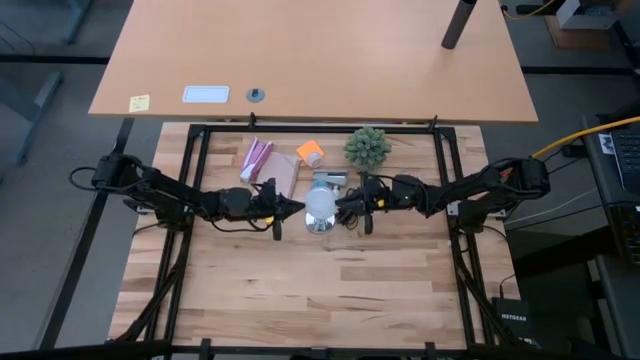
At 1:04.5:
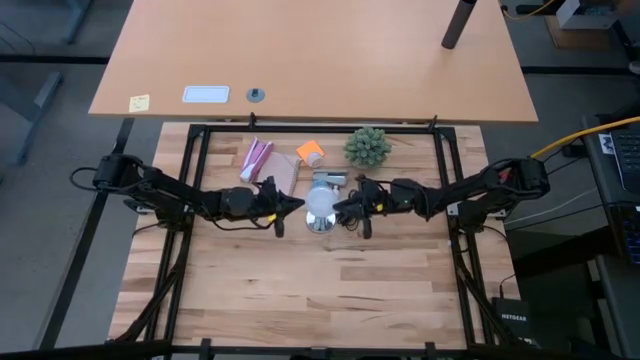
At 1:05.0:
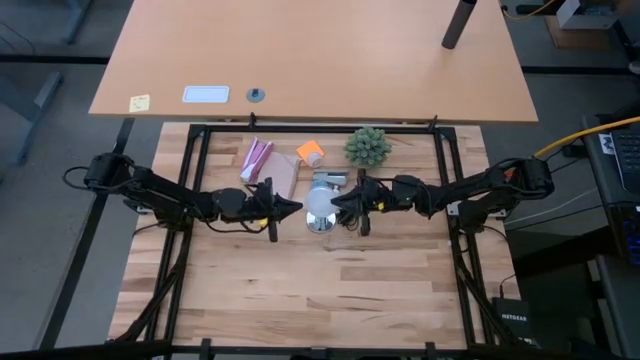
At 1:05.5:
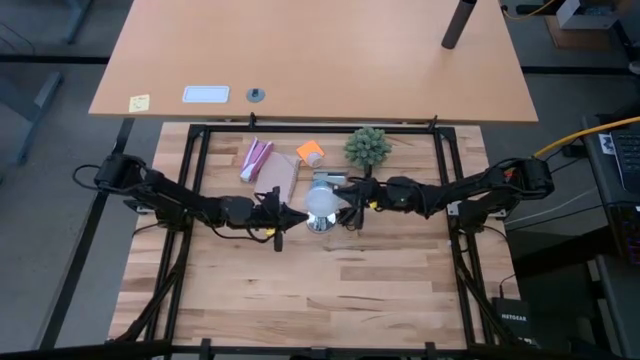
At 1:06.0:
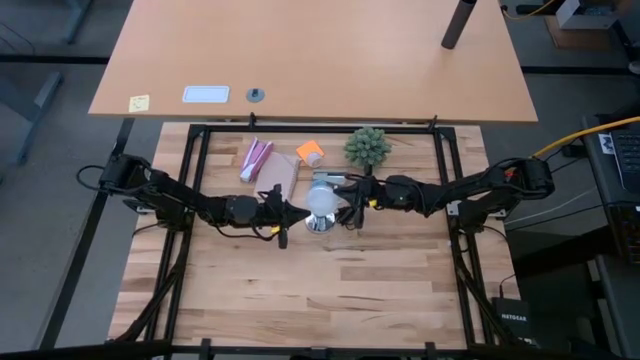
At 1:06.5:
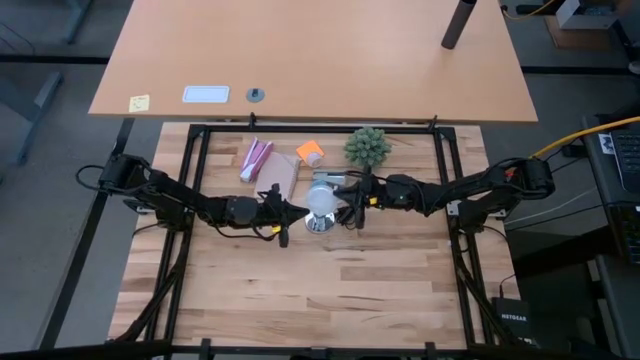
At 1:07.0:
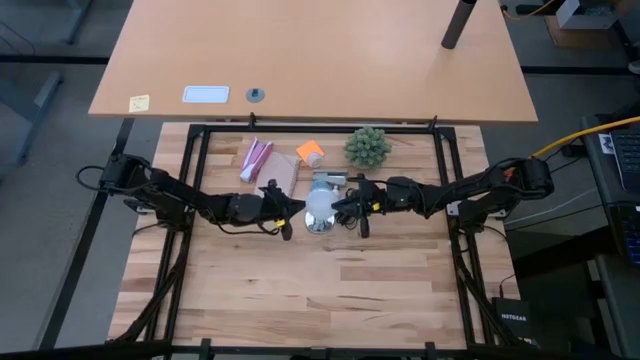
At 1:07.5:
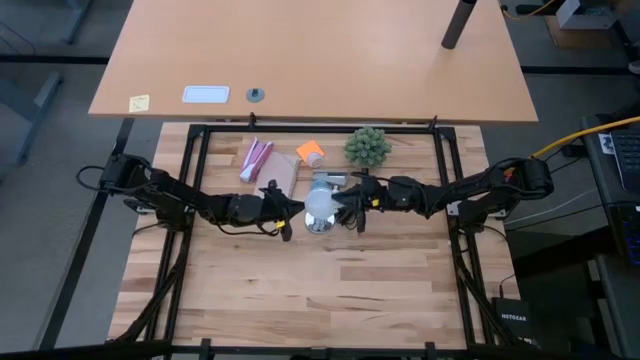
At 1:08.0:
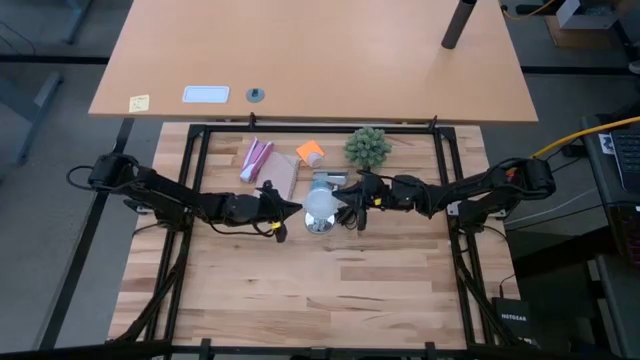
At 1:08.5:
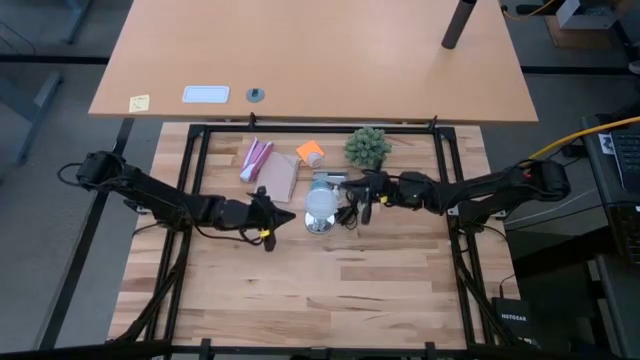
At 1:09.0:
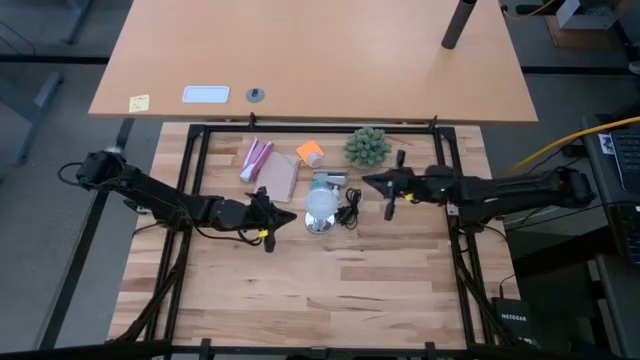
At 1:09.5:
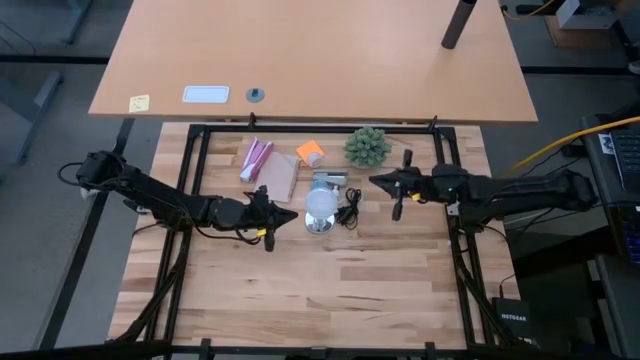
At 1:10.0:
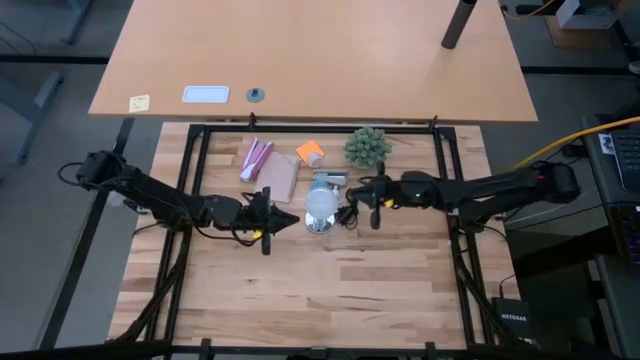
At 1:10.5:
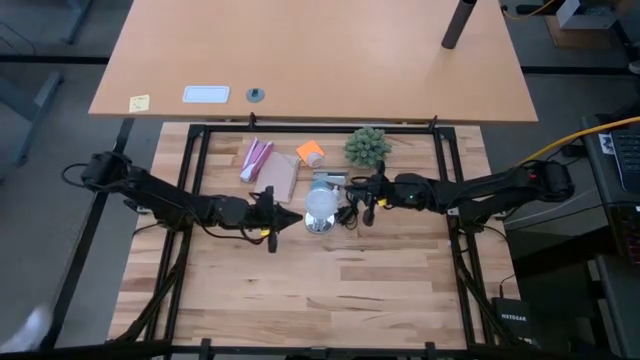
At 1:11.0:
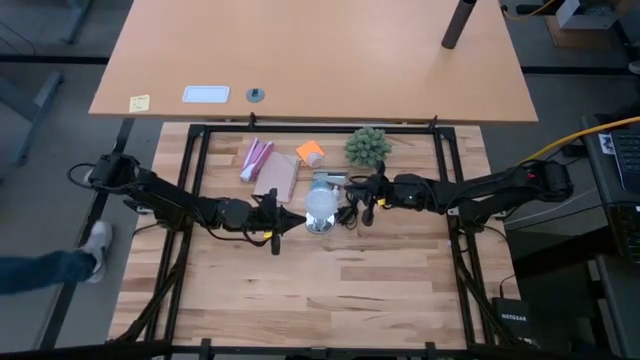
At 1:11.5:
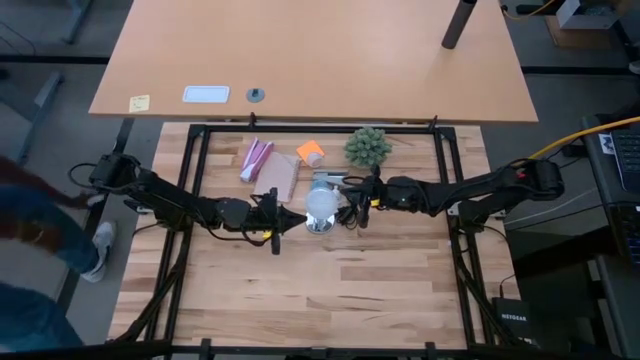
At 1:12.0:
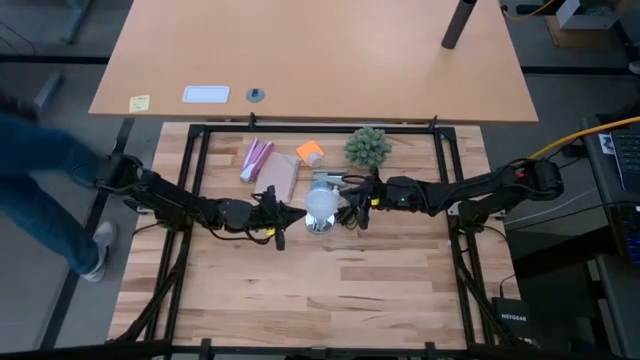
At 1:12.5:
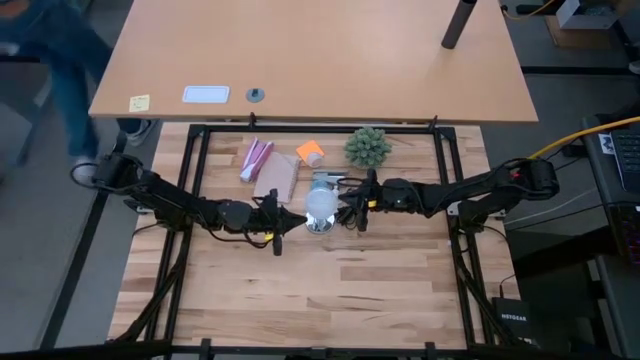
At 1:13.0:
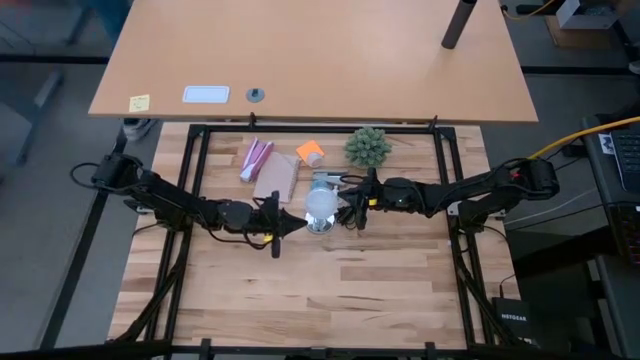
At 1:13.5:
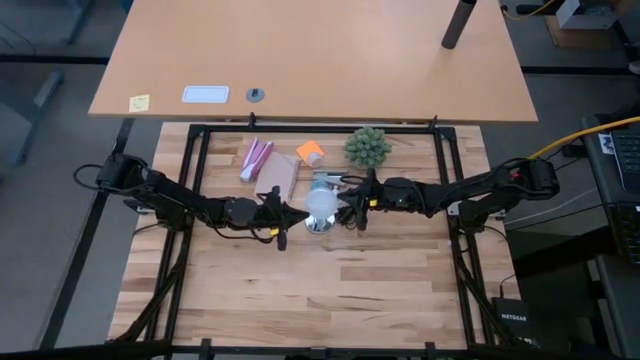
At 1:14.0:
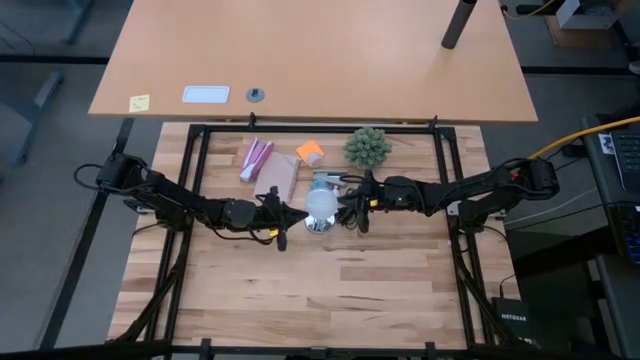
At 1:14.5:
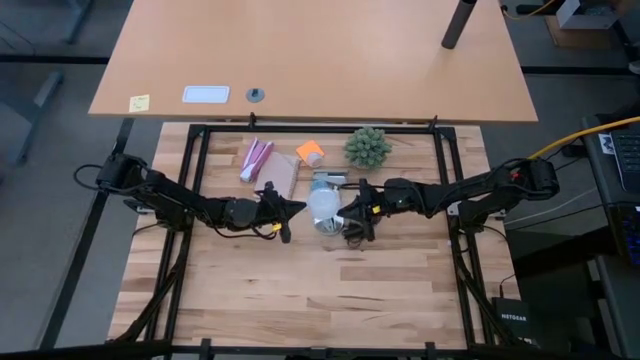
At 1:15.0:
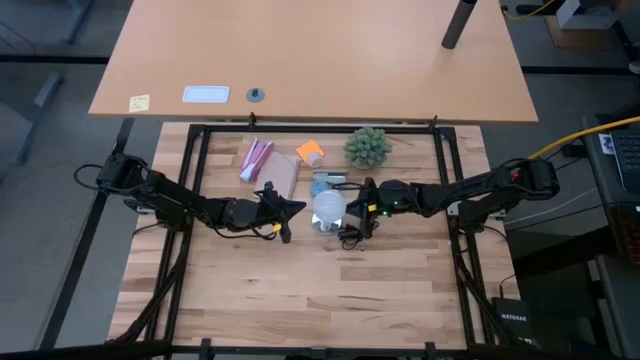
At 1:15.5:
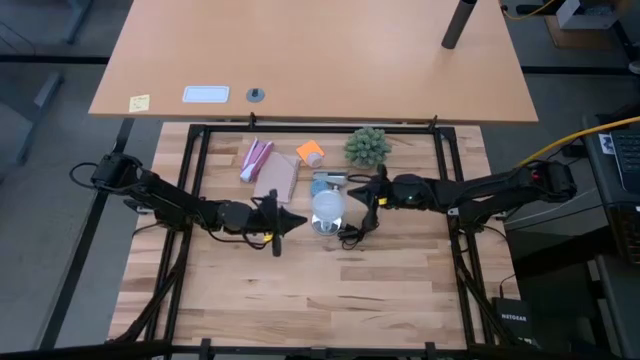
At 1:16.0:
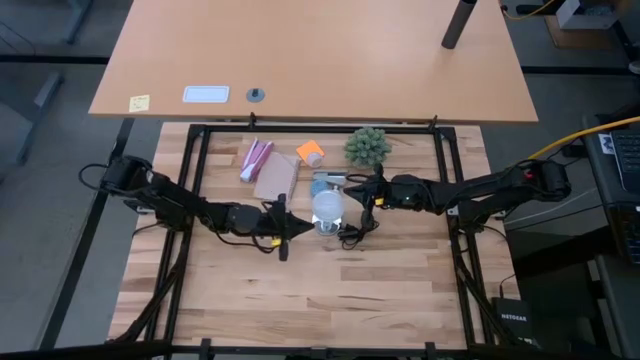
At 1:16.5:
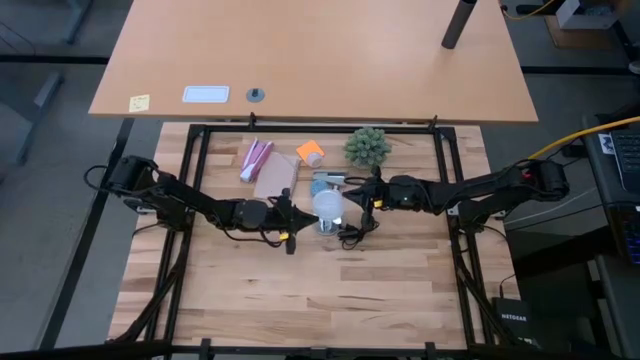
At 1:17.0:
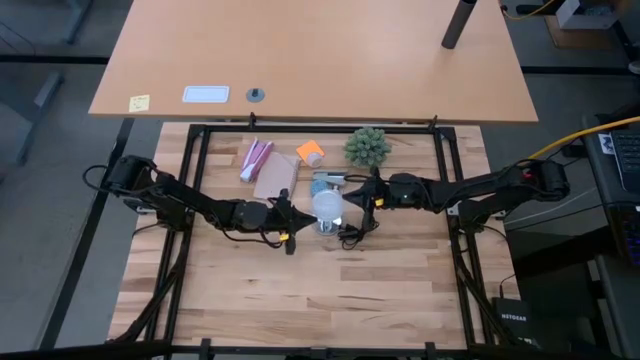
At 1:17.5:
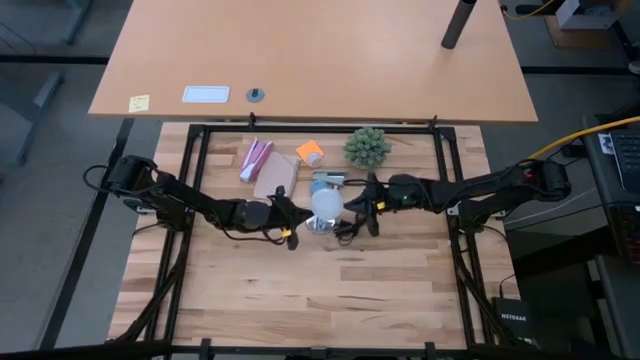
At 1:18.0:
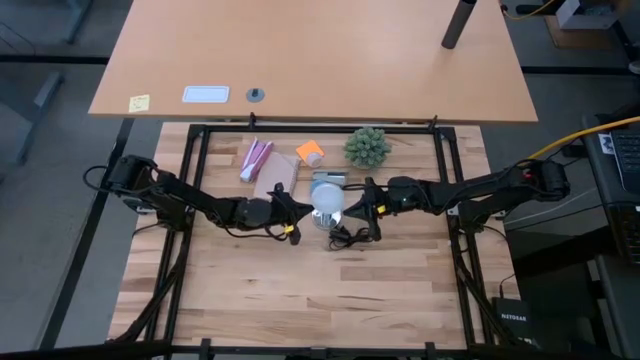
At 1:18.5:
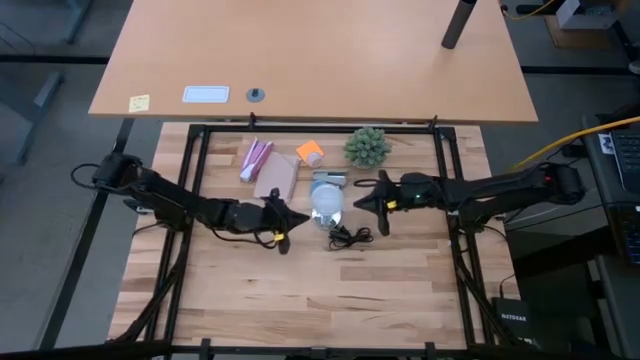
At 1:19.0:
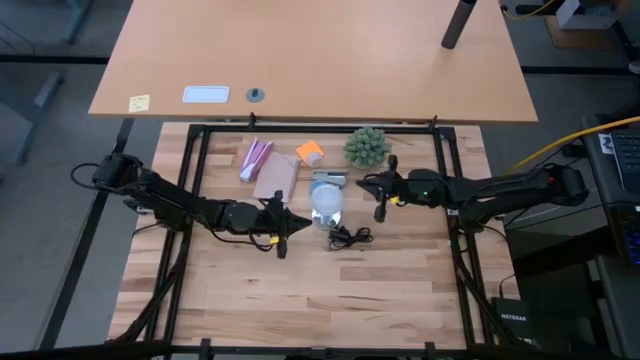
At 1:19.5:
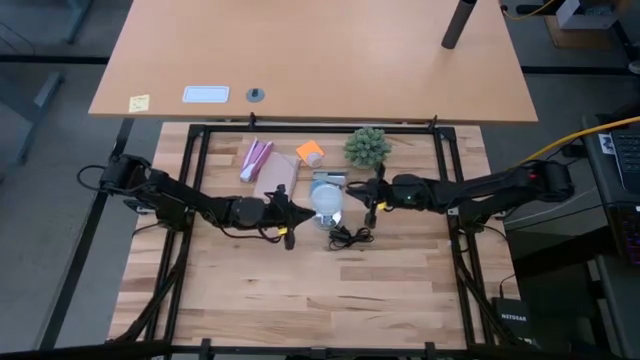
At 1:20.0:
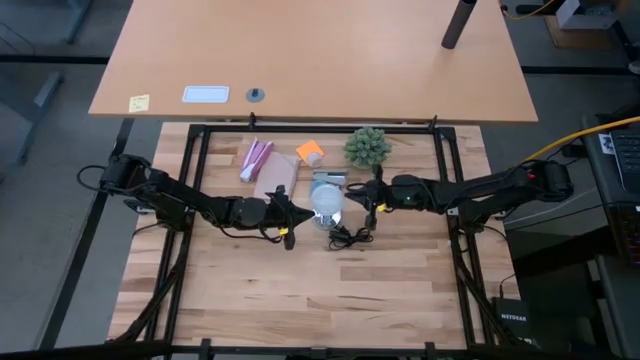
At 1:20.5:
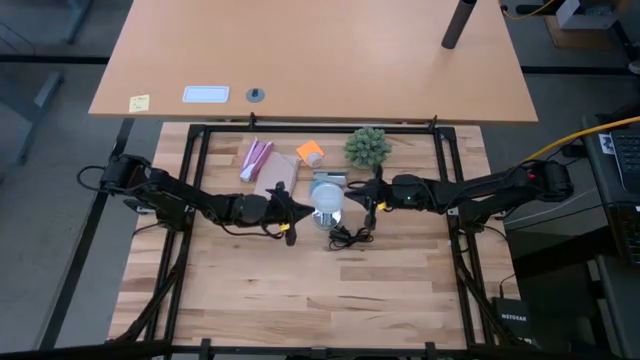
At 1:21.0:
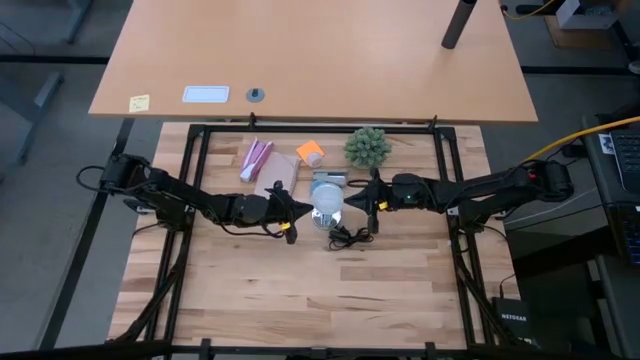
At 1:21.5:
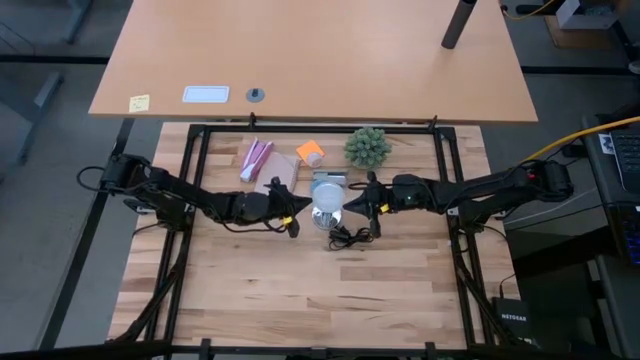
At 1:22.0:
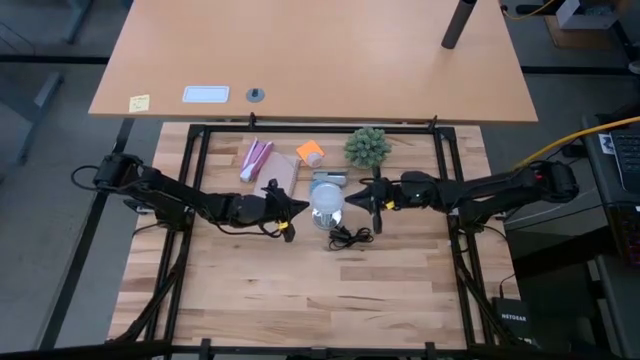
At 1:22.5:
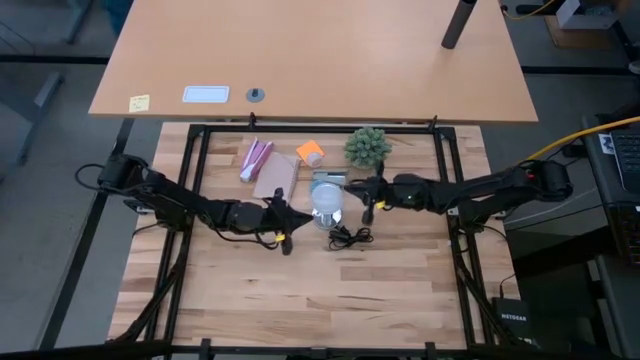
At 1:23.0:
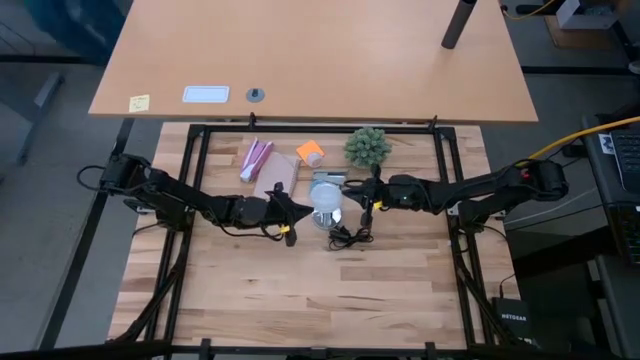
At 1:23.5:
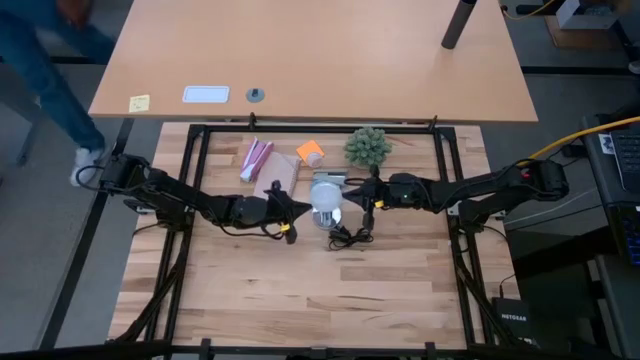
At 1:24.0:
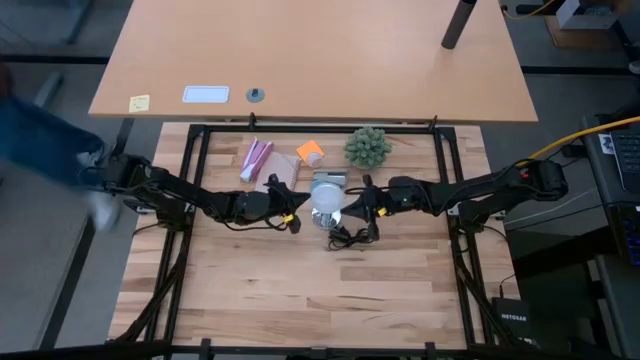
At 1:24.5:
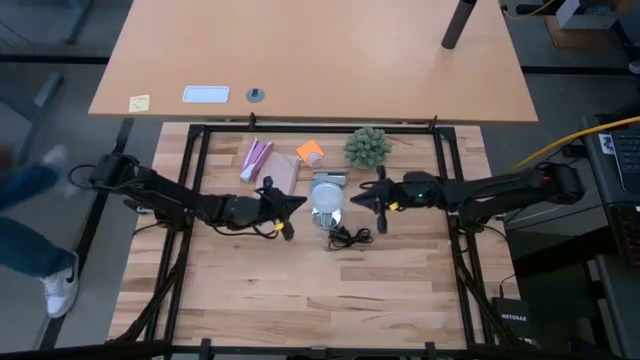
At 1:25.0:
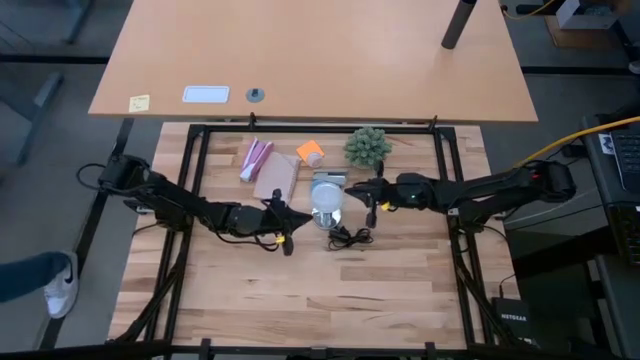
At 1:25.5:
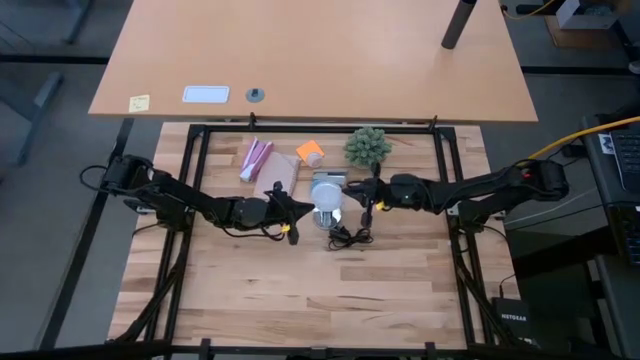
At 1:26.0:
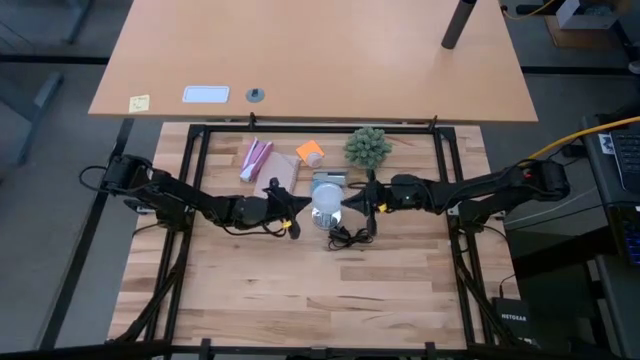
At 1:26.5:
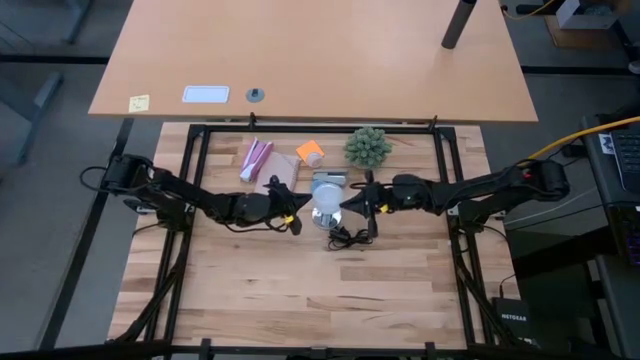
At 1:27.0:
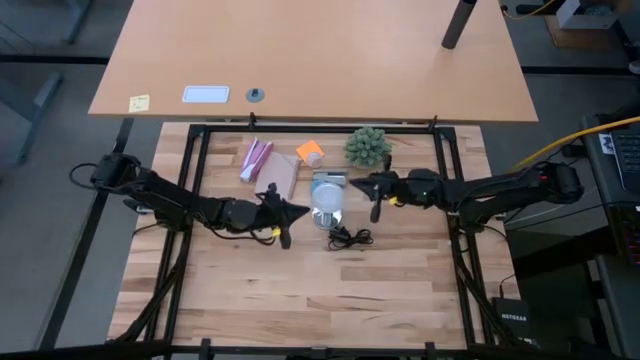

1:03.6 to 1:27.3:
Task: Screw lightbulb
Insert the lightbulb into the silver lamp socket
